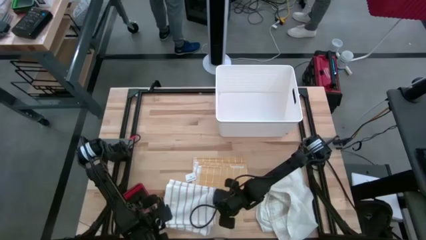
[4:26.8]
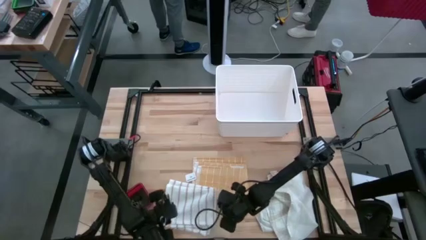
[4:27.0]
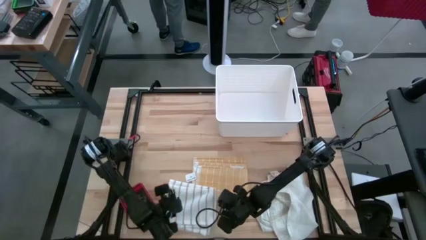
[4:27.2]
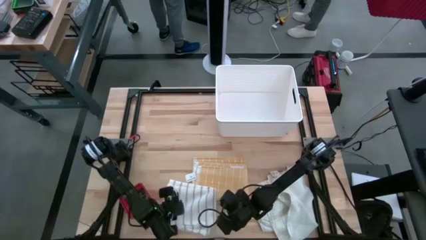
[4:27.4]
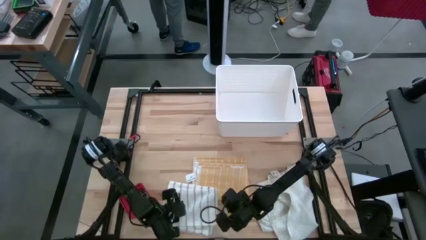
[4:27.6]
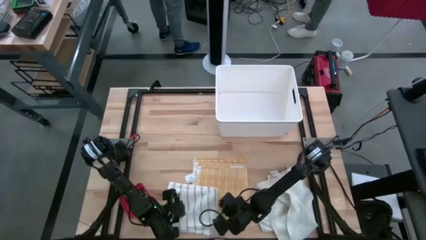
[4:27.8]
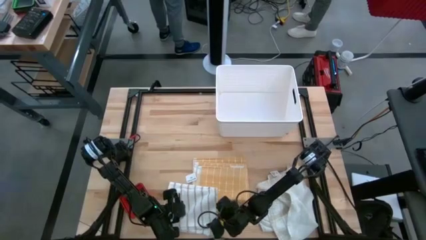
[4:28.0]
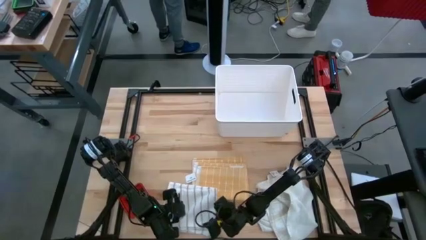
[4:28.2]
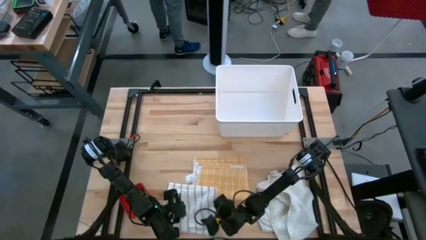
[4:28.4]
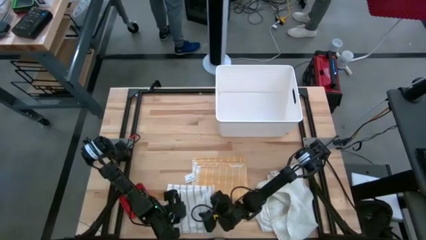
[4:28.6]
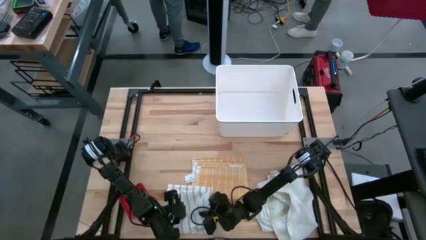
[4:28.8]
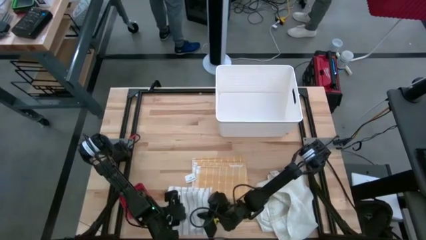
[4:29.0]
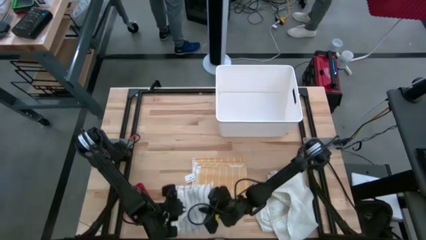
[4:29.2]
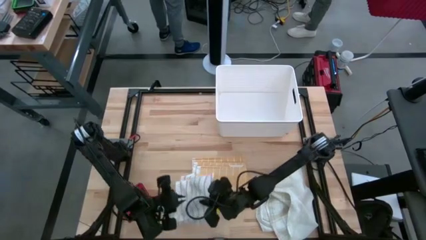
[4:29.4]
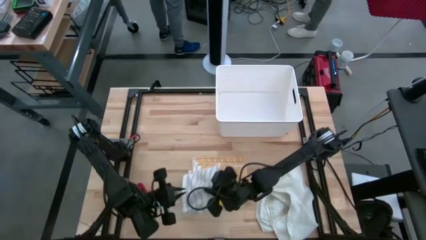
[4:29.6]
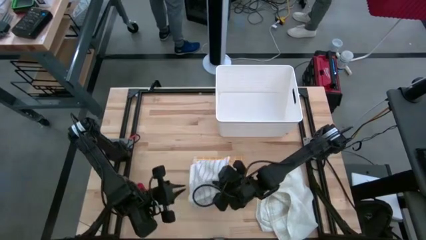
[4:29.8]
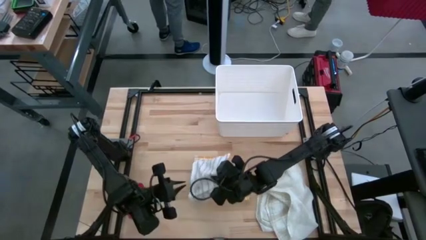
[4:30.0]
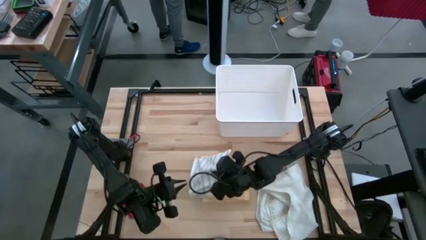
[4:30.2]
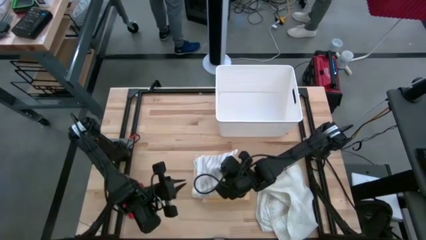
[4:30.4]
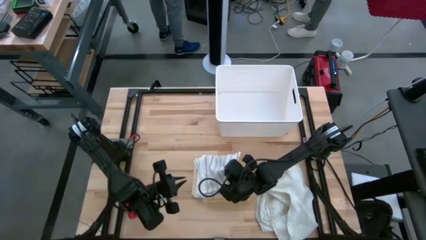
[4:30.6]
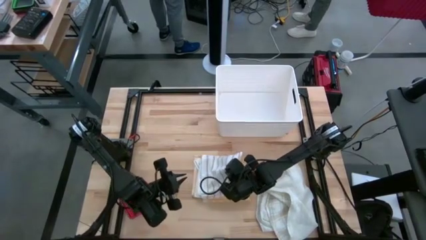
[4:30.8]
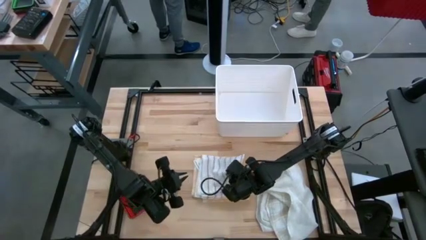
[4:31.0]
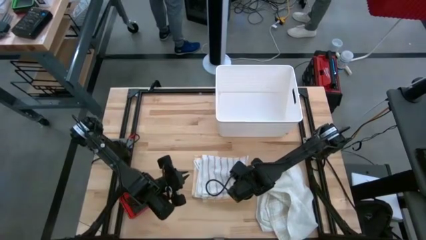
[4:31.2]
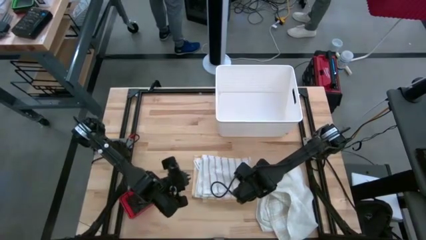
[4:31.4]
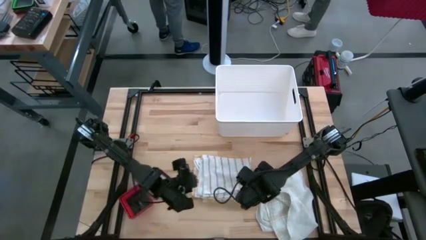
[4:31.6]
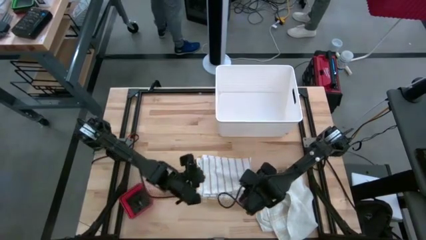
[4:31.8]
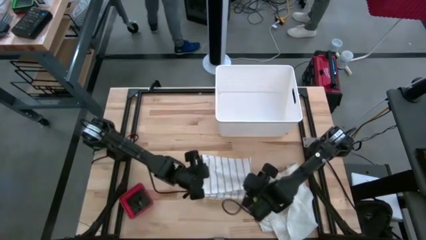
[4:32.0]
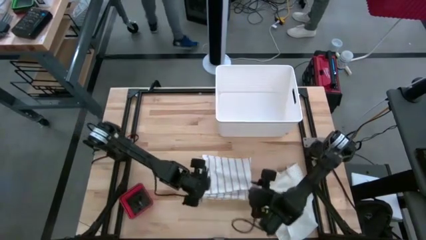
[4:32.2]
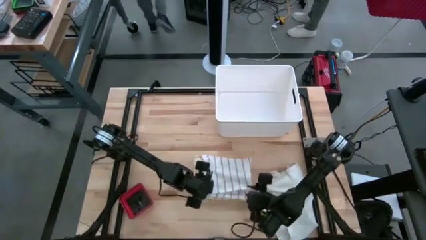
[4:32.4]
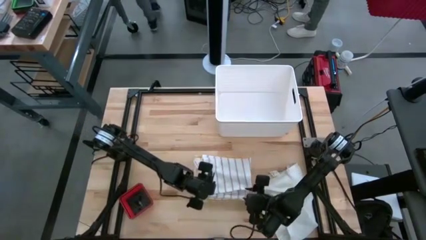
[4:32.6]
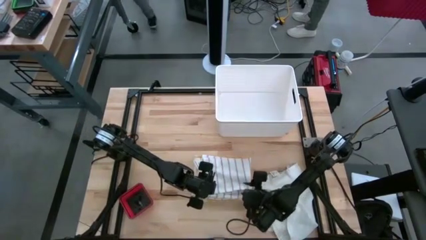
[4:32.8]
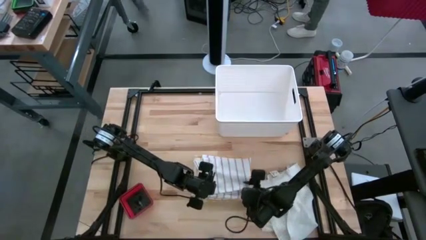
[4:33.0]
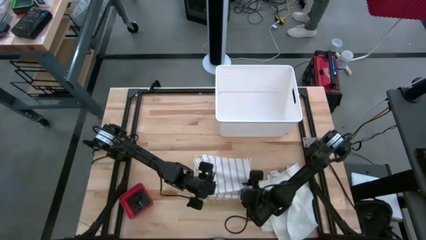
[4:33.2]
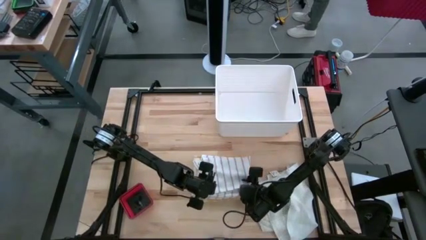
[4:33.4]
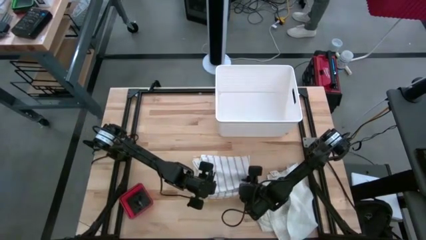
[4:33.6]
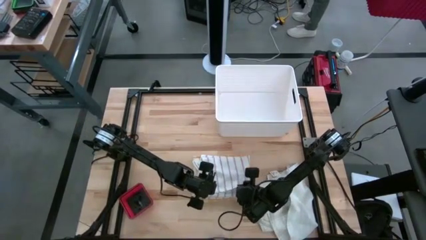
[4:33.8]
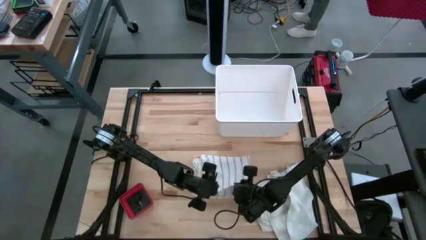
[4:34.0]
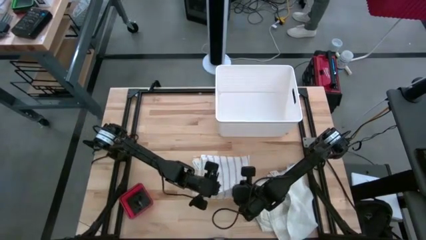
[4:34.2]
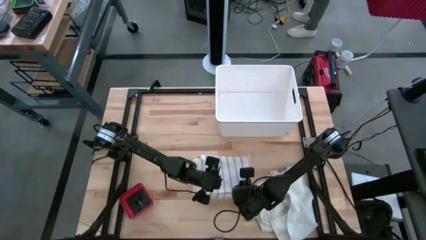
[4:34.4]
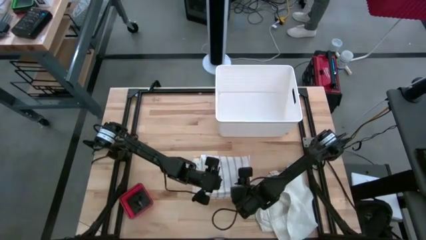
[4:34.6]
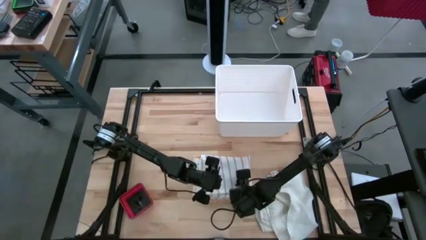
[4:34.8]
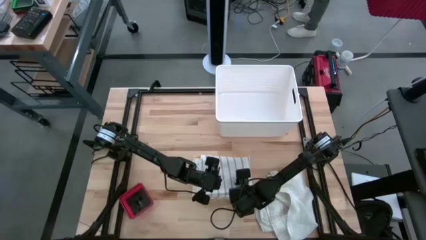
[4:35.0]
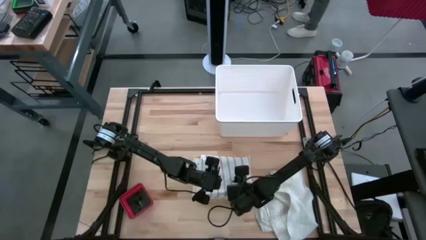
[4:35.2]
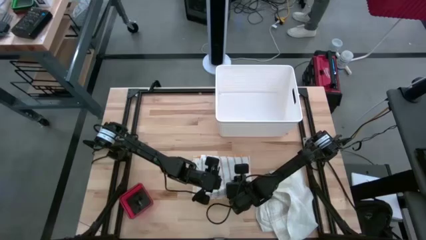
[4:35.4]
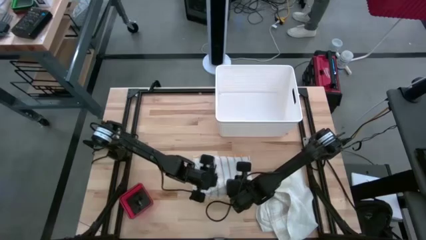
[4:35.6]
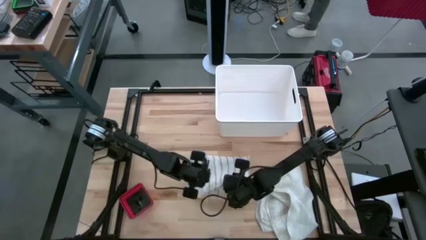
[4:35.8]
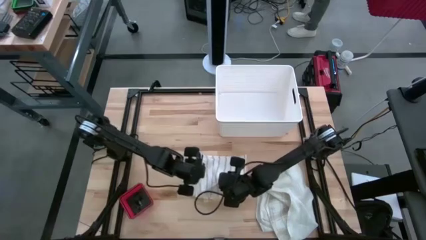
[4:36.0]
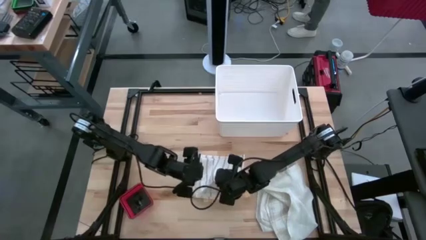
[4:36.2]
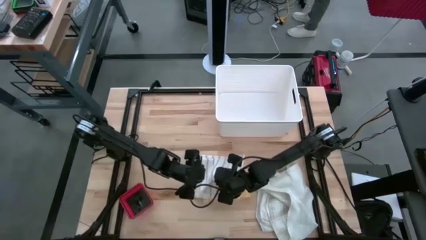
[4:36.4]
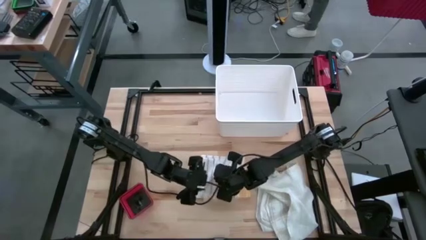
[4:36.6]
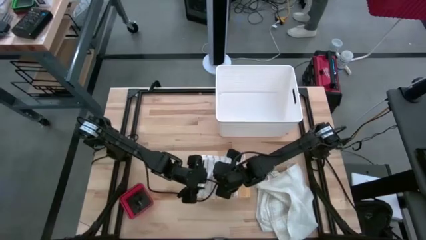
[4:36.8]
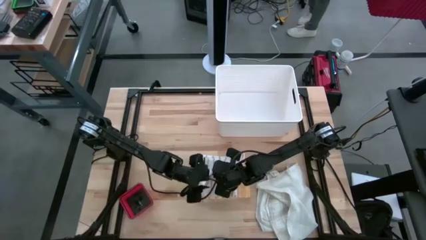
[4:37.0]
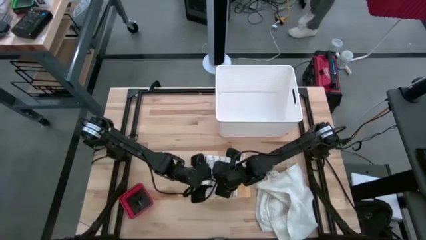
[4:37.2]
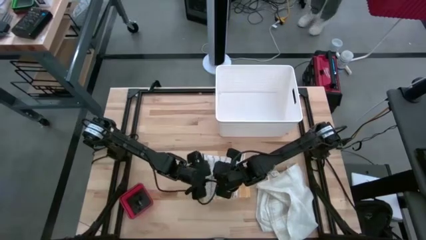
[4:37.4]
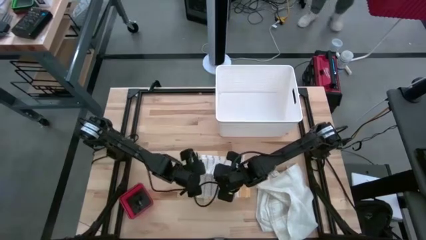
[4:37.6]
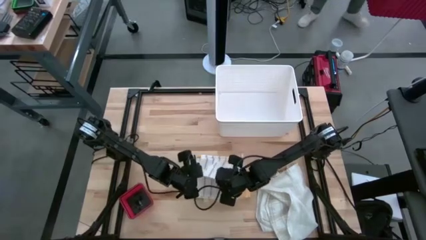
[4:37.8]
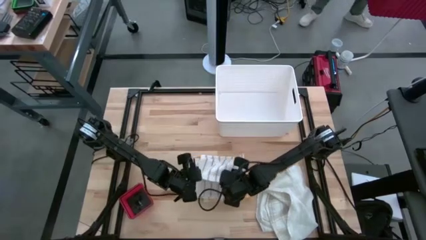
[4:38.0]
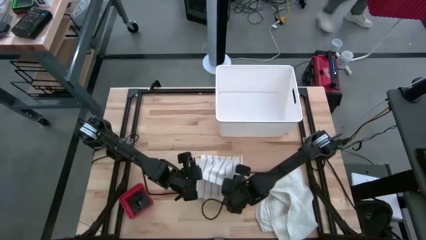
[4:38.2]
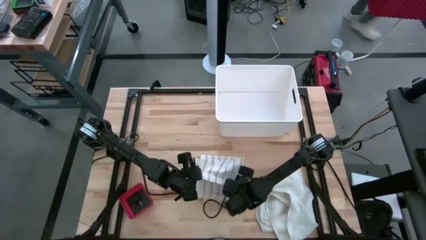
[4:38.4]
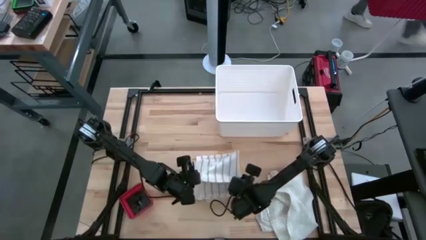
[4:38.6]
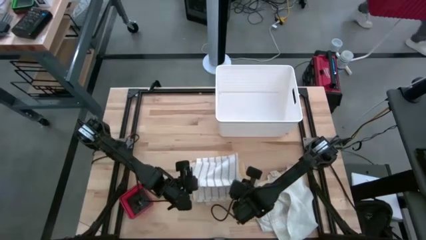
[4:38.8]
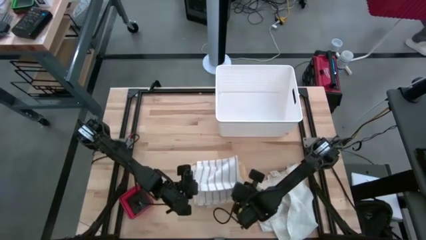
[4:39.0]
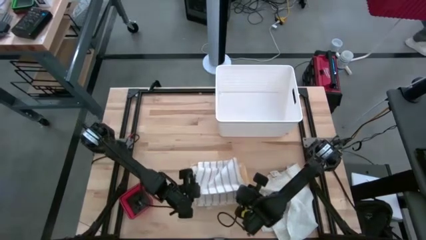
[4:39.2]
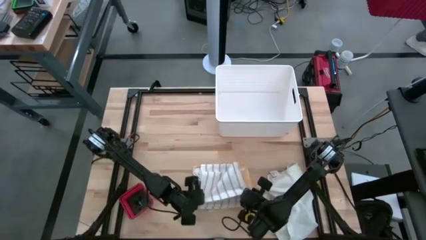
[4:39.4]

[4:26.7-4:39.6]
Task: Fold towel
Stack the brown towel on top of the yellow towel
